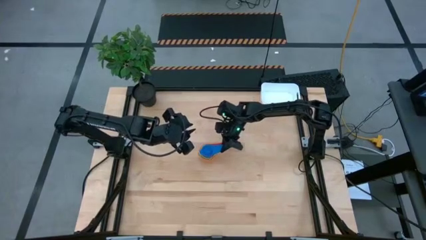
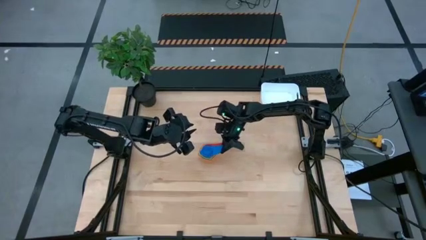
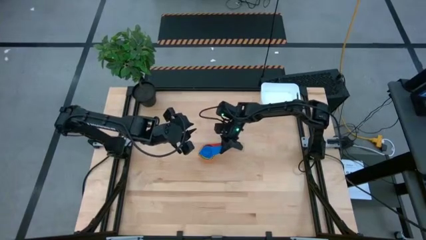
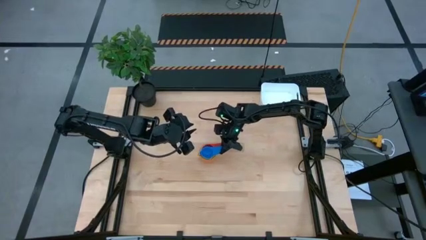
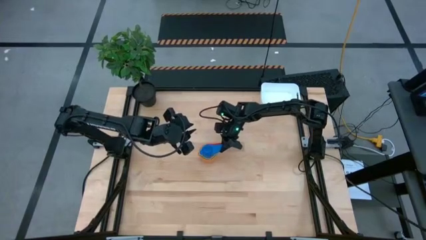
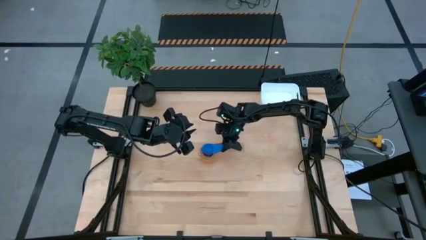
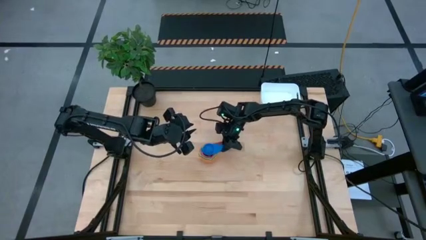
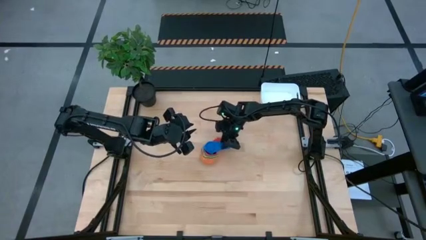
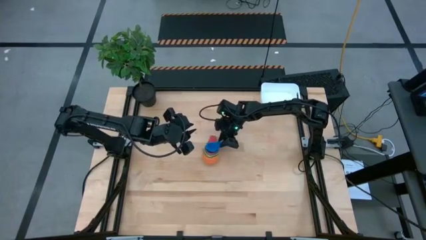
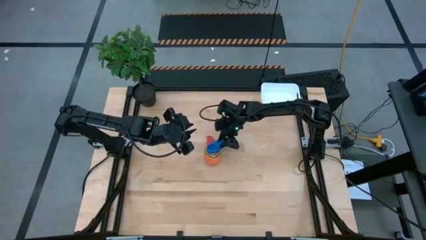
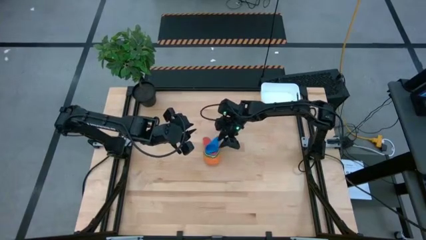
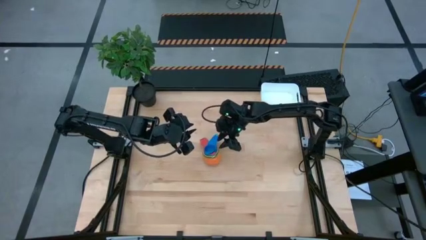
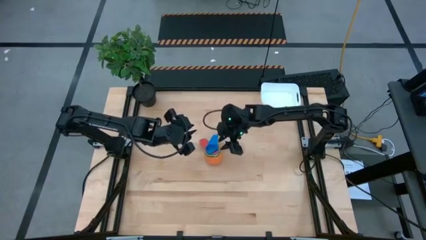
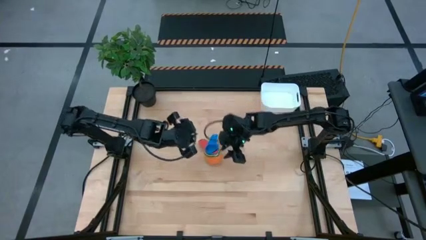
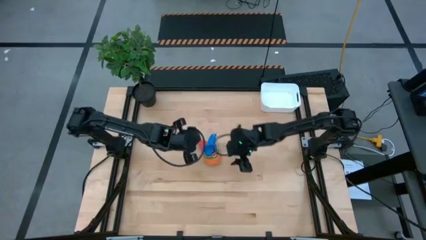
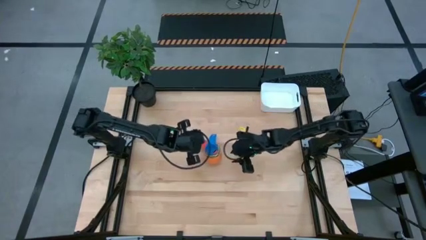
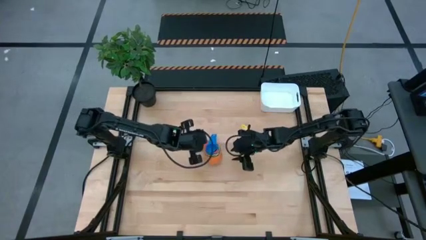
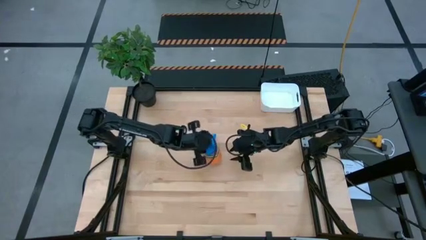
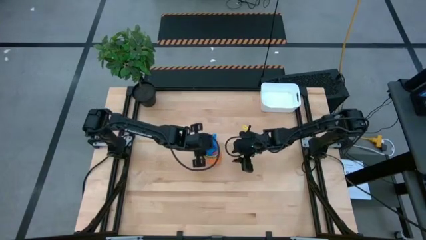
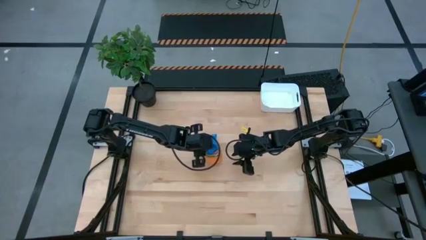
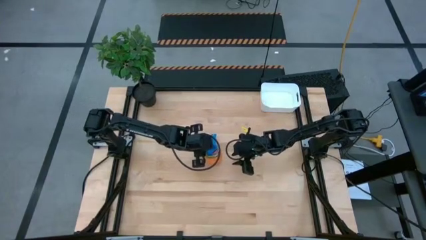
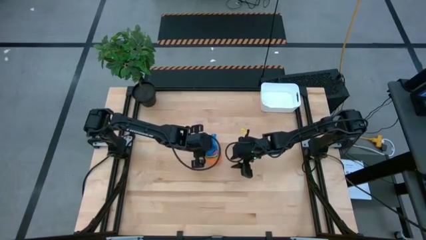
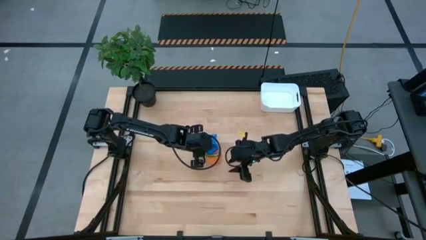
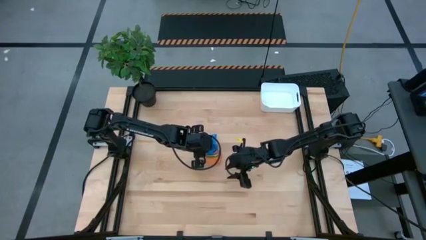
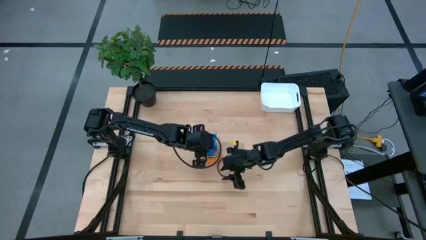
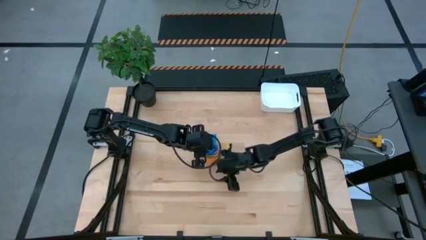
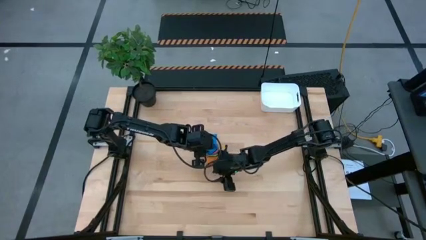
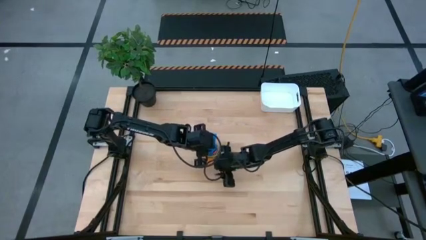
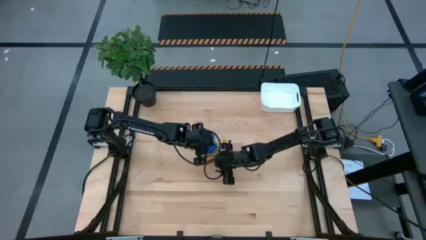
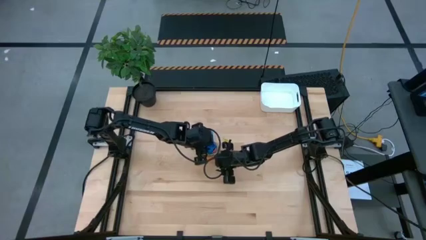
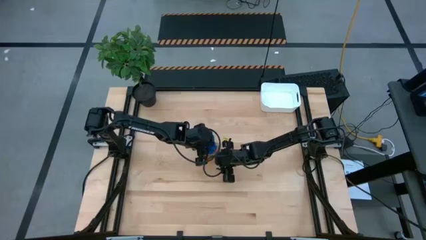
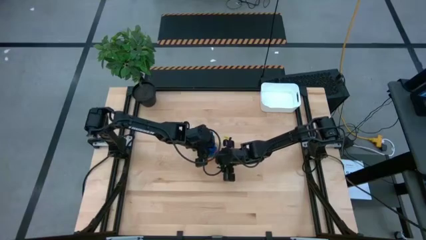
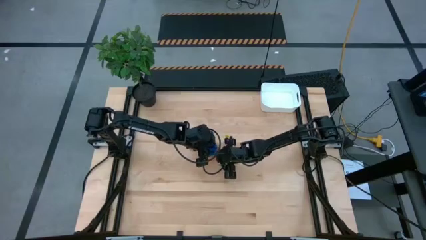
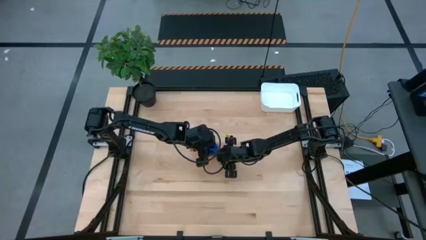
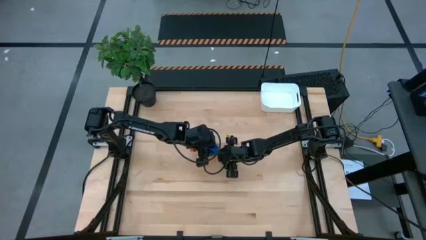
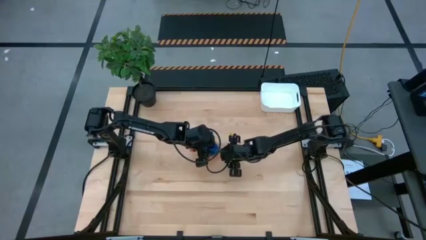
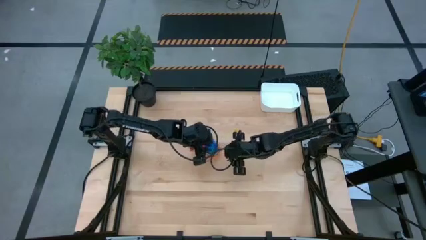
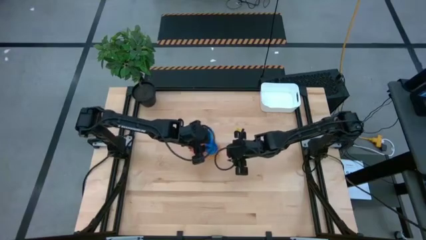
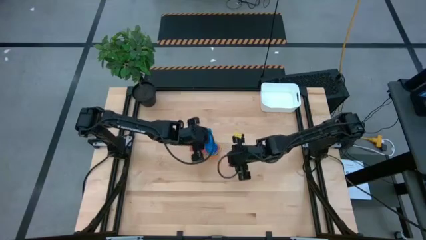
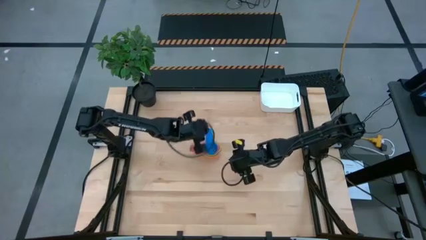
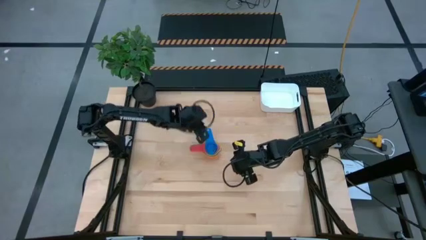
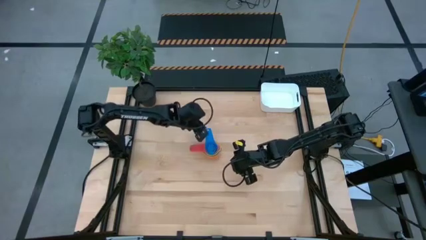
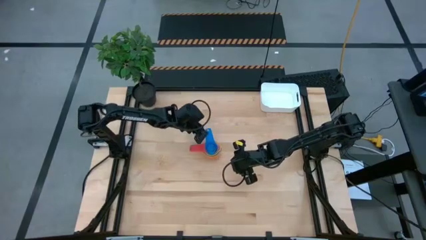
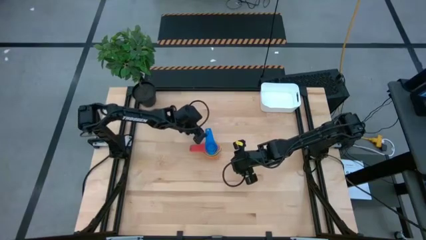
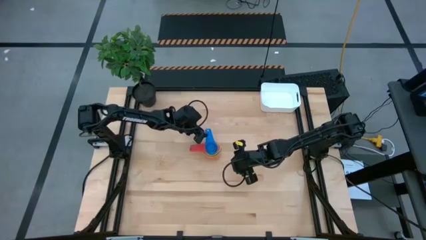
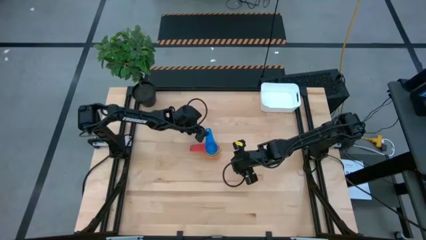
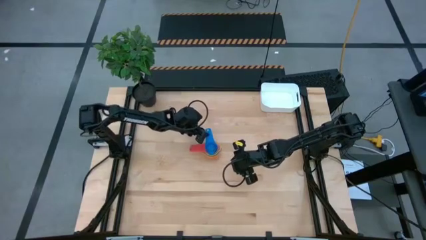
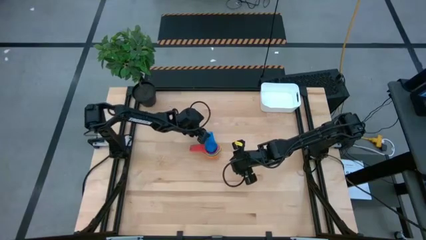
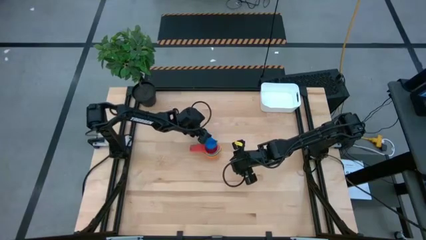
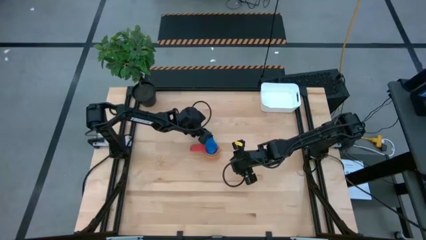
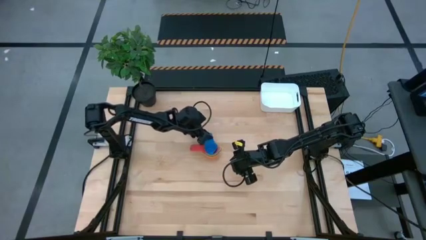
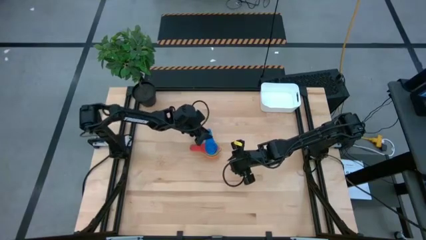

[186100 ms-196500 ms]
Task: Nest measuring cups in basket
Stack the blue measuring cup into the red measuring cup
